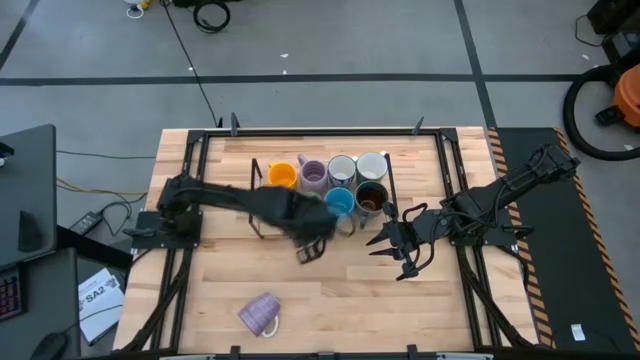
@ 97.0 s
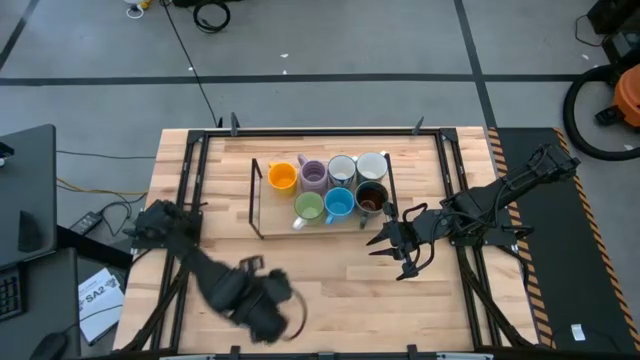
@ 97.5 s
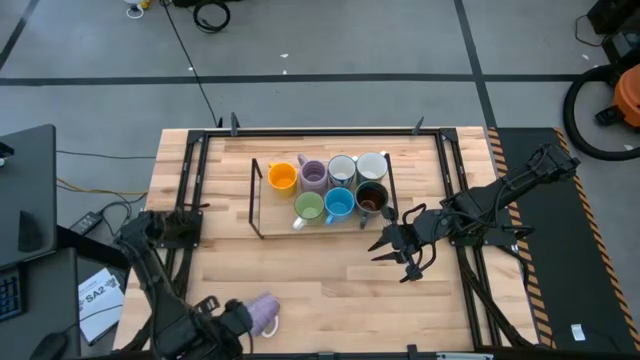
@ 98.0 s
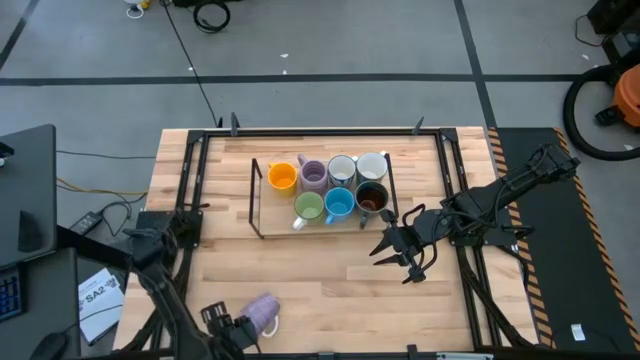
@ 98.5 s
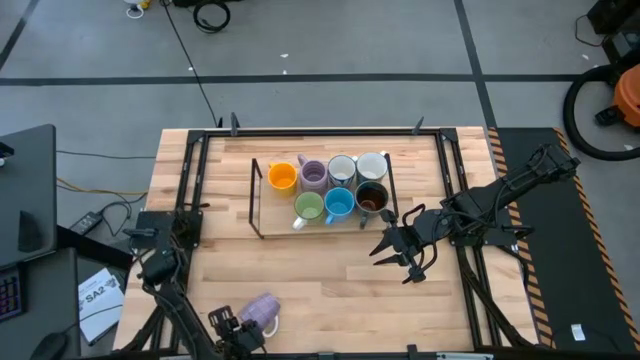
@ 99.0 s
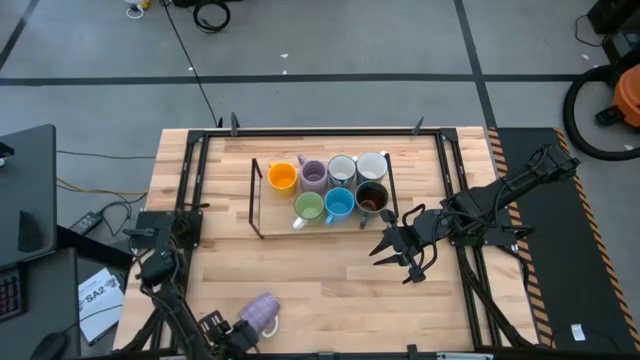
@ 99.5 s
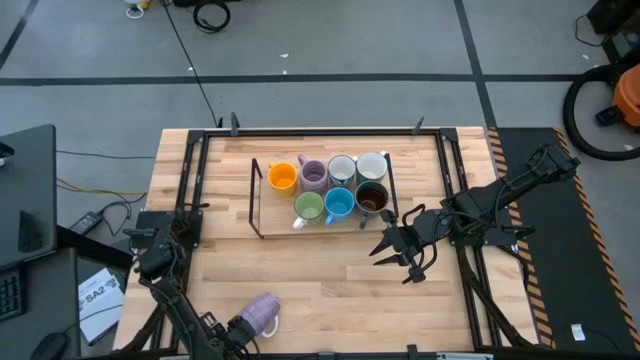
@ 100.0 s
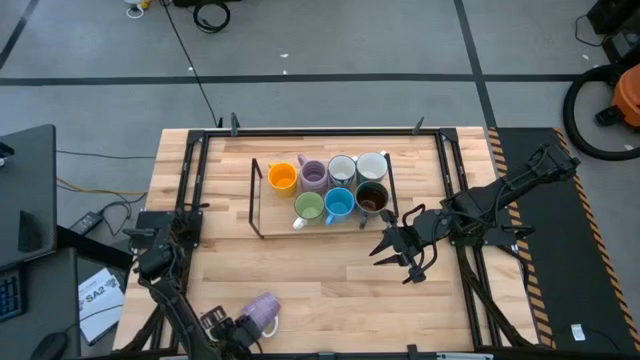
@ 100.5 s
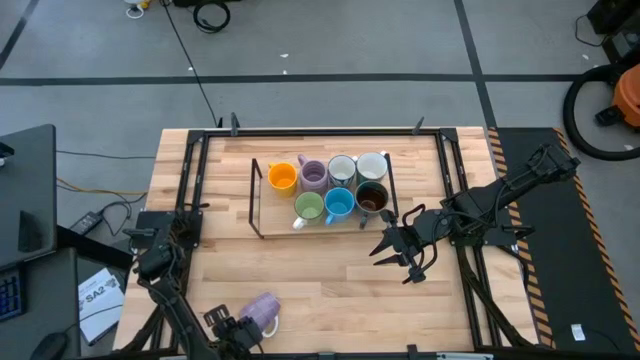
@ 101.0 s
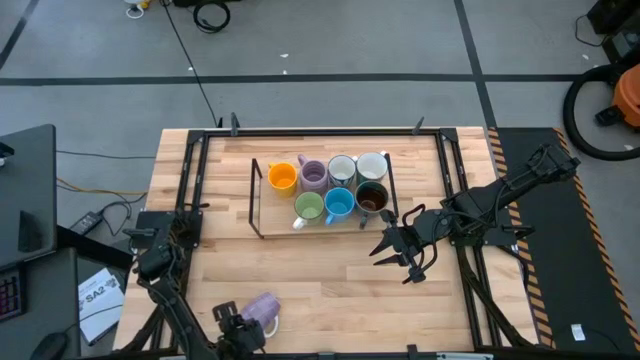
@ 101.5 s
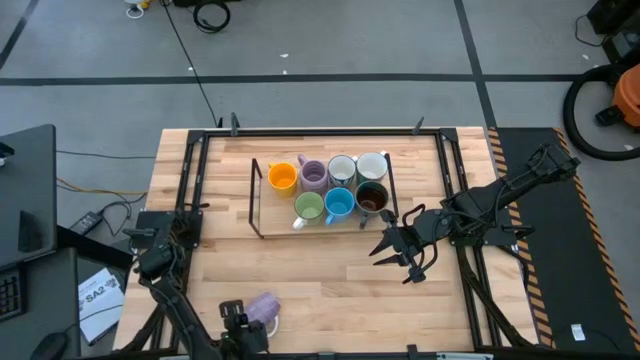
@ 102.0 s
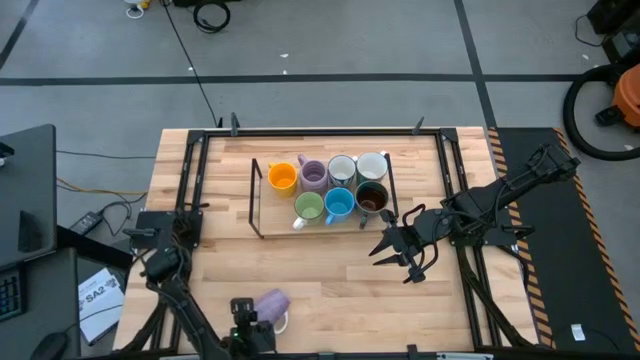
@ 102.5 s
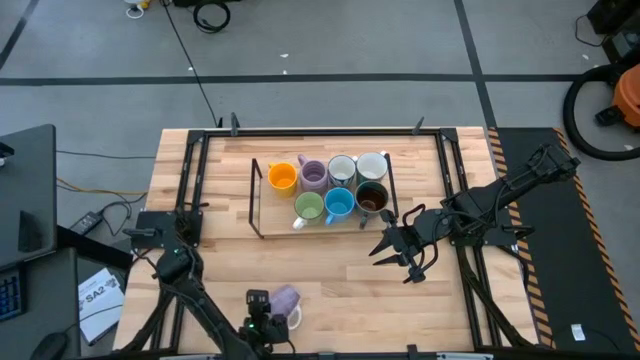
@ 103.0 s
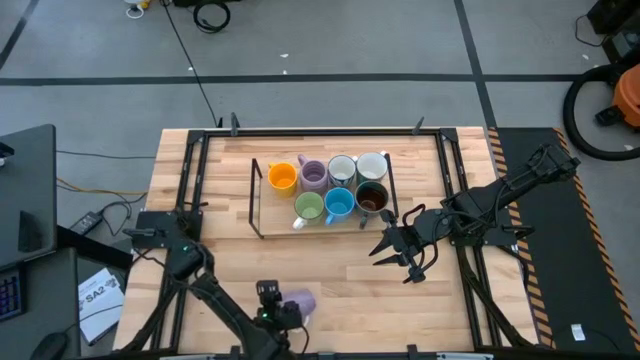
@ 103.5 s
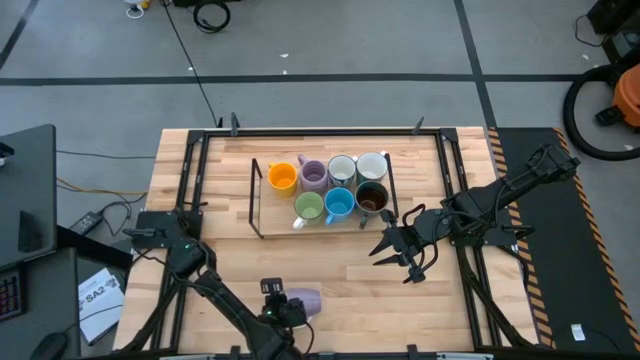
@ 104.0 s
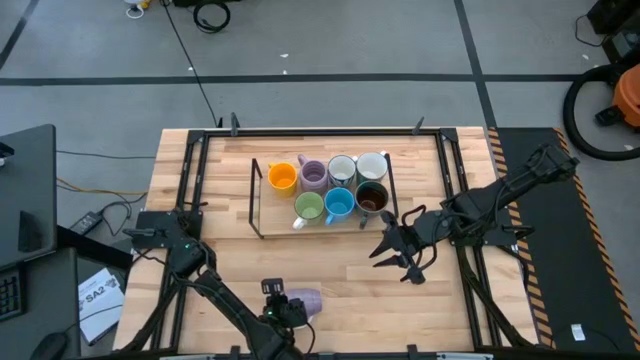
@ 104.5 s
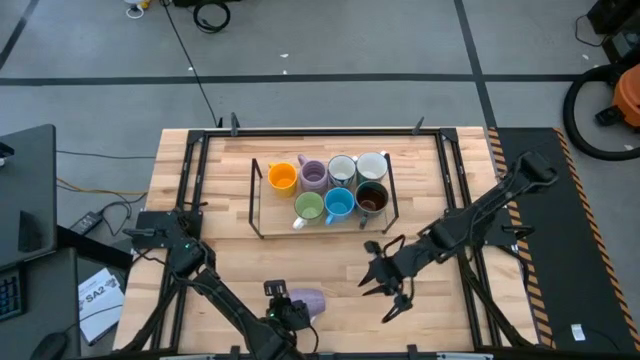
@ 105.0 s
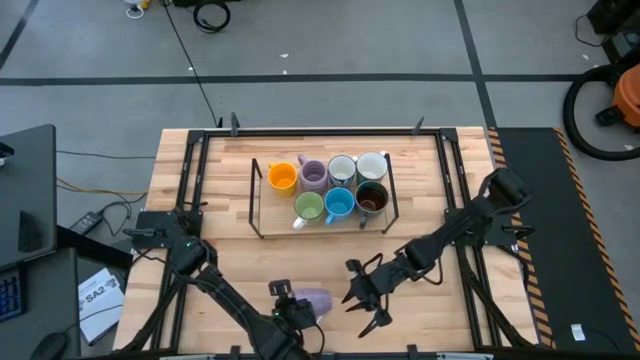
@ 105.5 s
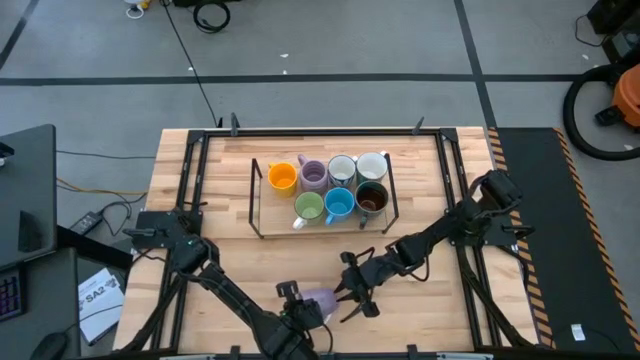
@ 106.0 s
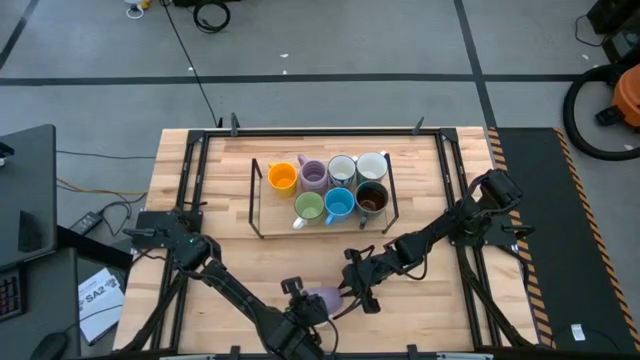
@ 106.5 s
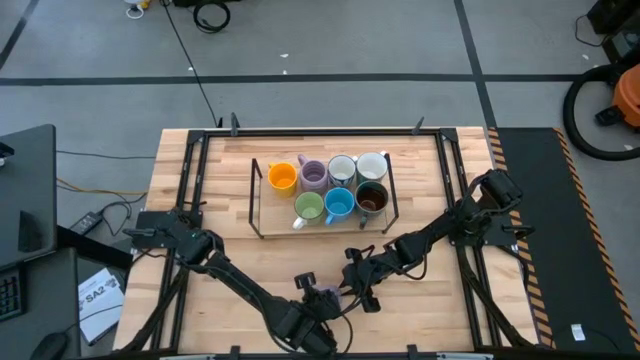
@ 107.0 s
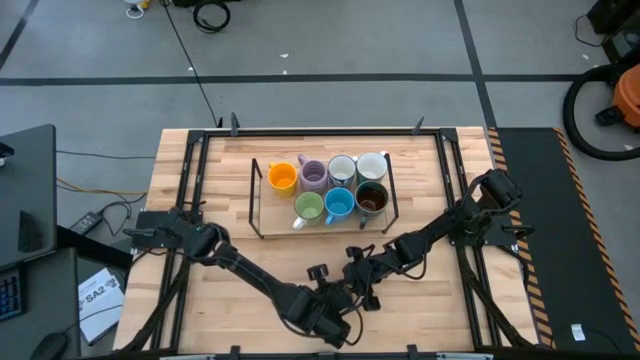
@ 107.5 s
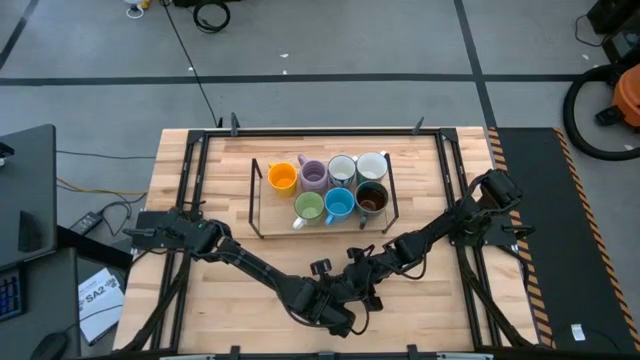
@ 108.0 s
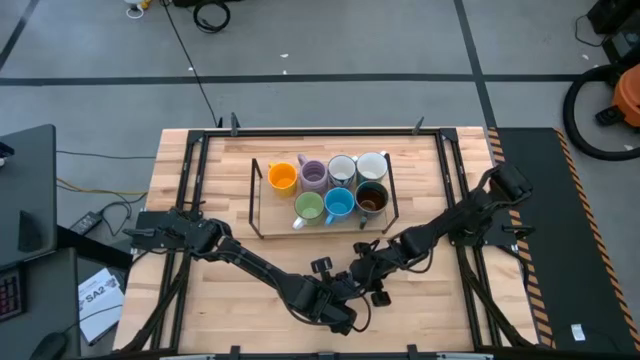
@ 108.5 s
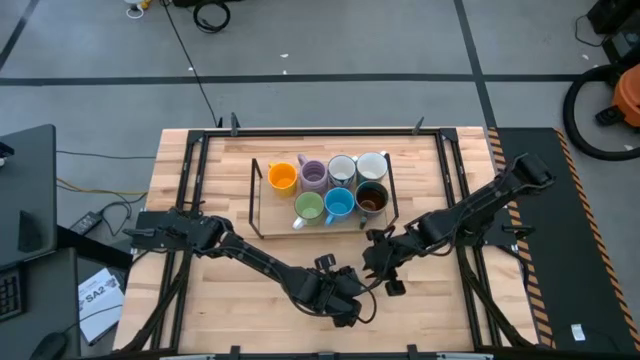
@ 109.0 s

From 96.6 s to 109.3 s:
Task: Place coffee mugs
Put the purple mug on the shelf
